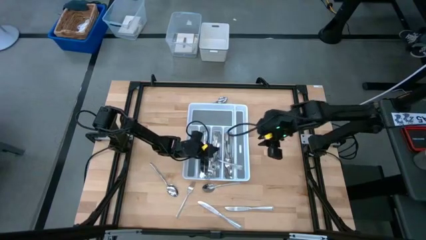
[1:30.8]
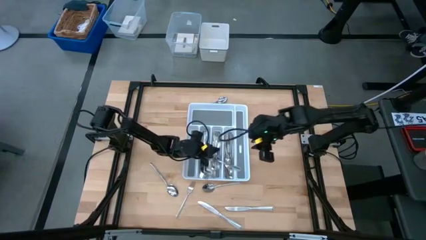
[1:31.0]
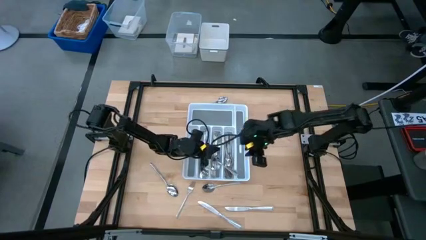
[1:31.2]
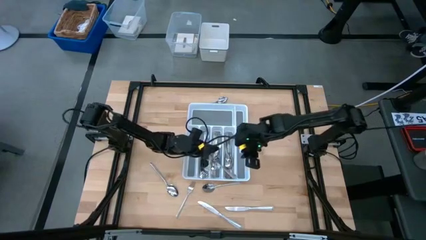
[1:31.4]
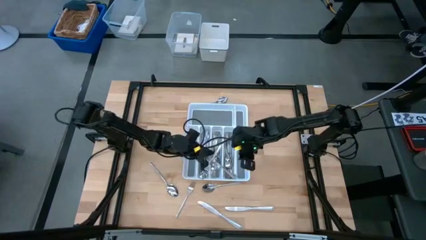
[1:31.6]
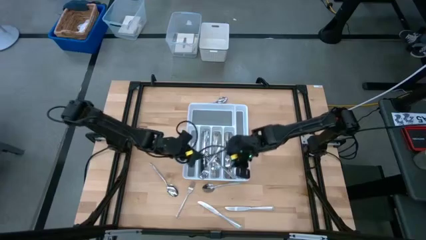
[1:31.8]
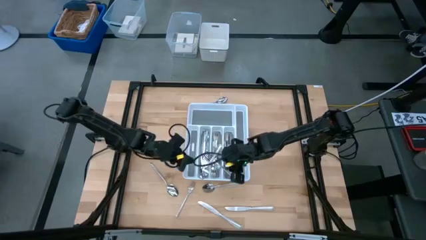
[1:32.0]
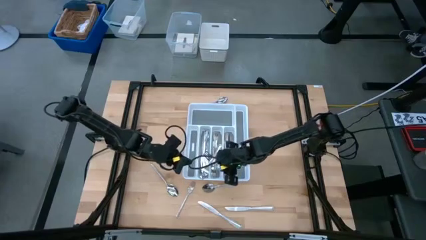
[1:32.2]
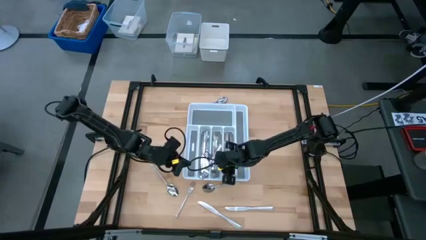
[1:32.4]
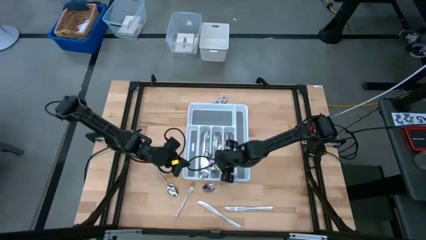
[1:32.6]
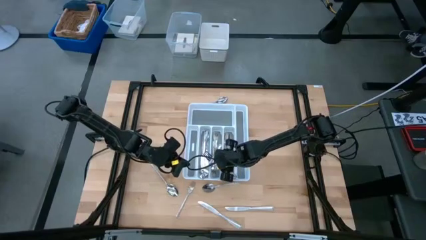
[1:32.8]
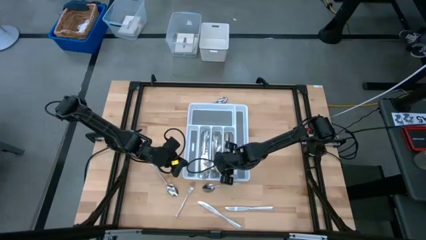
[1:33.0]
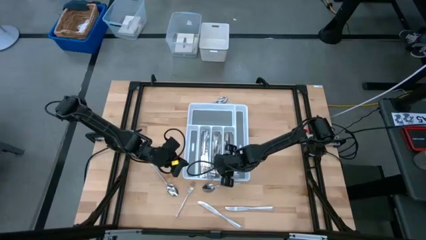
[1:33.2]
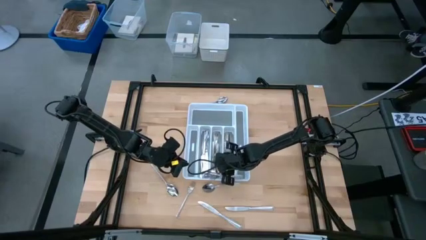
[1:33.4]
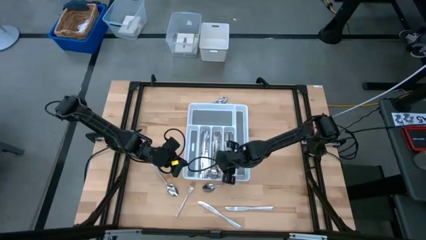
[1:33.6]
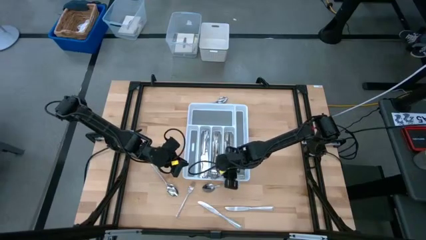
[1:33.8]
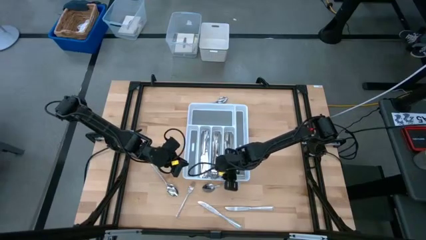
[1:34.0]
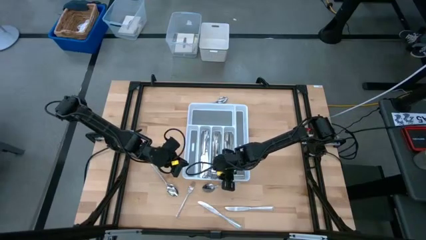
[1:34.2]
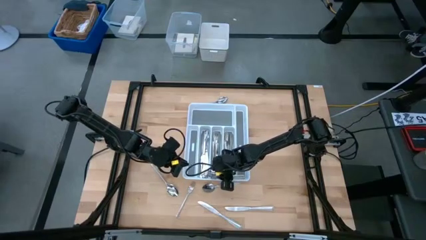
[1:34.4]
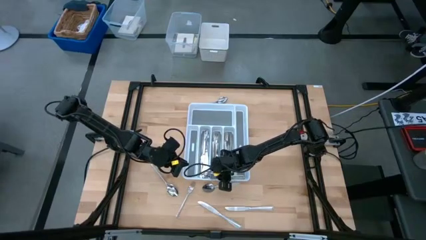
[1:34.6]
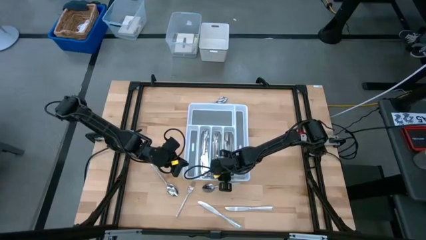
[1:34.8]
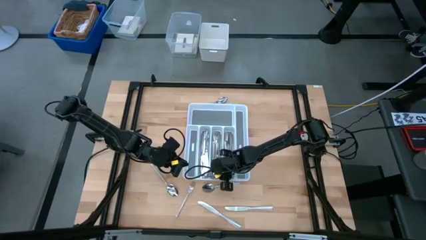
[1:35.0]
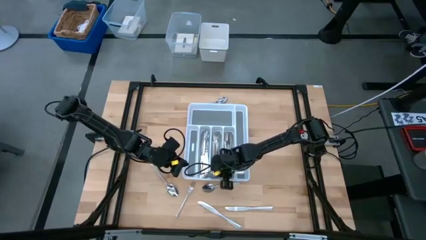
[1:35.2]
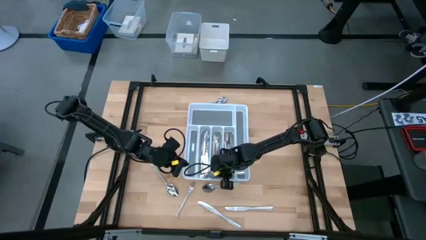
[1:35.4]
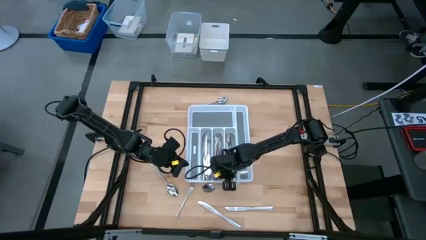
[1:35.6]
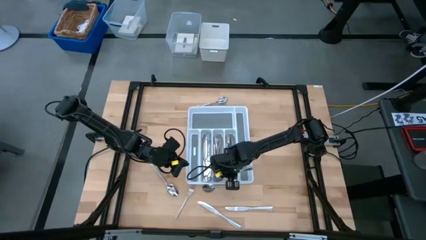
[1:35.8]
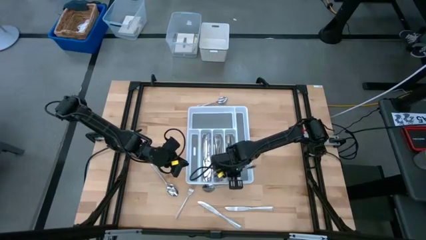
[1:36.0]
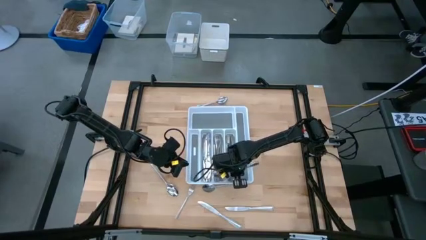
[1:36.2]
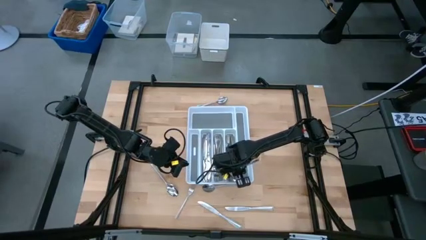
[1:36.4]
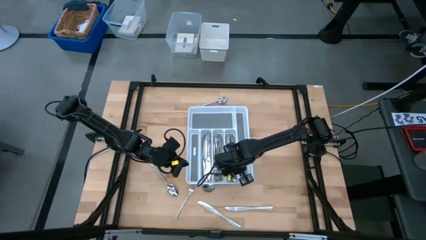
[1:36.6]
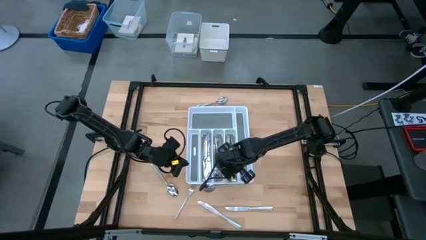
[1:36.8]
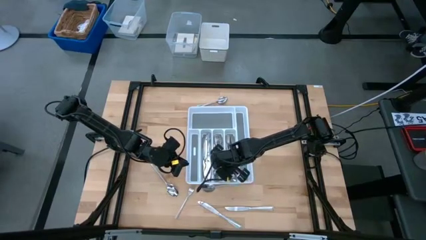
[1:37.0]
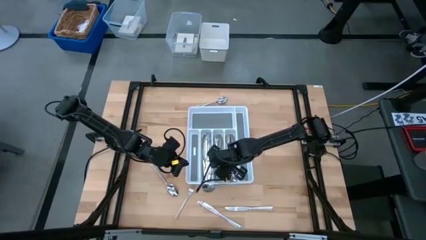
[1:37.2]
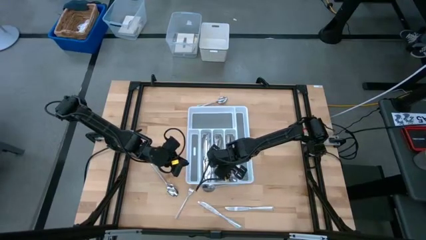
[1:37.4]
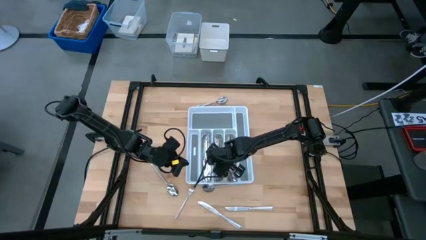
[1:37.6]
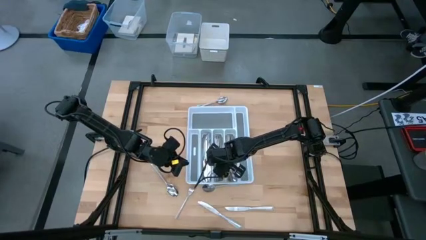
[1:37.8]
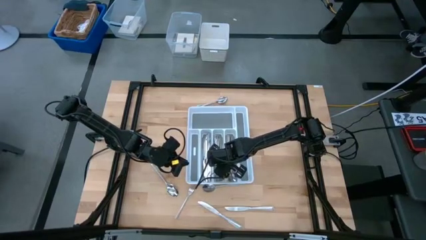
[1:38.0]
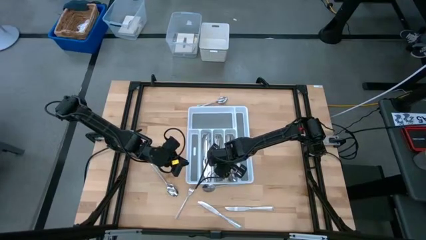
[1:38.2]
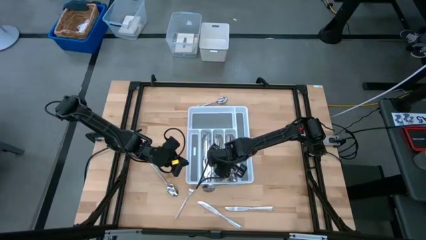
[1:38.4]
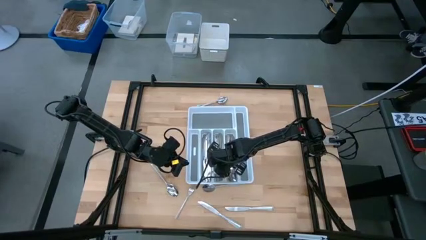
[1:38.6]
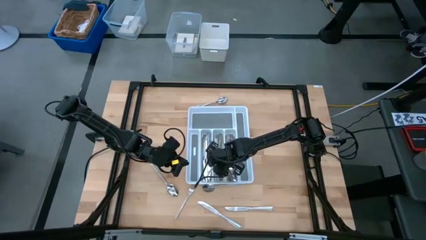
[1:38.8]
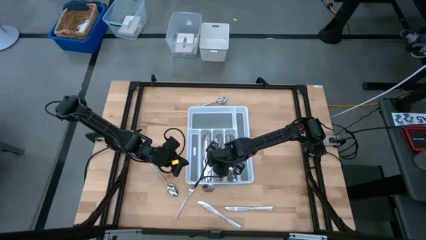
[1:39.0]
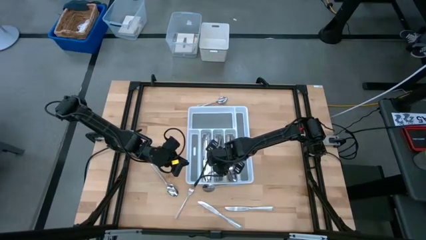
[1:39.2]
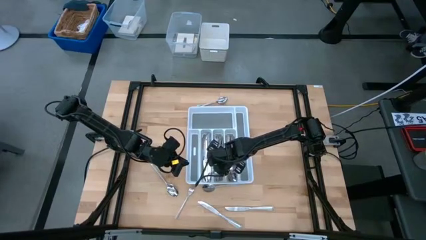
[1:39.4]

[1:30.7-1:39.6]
Task: Sort silverware
Adjust the silver fork in the white cutlery tray

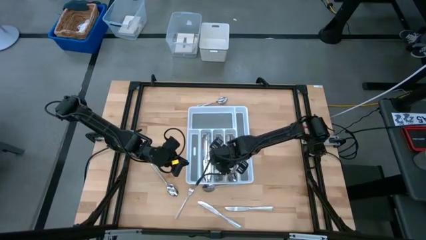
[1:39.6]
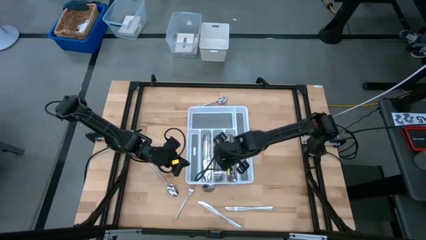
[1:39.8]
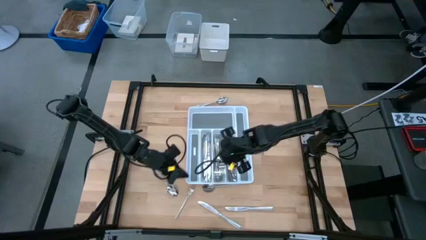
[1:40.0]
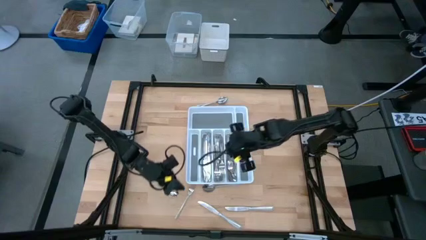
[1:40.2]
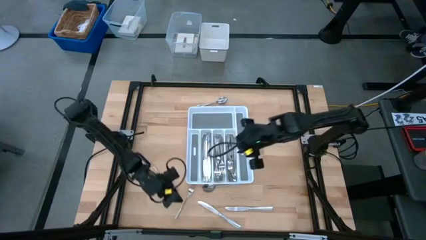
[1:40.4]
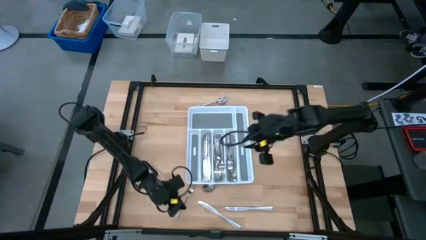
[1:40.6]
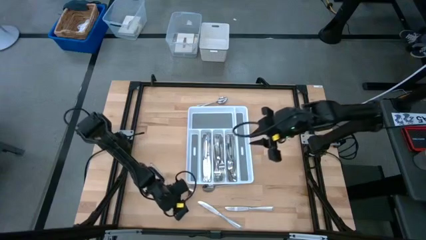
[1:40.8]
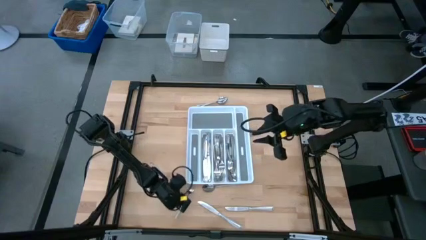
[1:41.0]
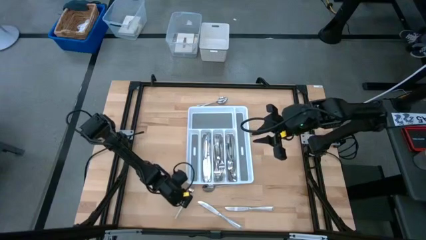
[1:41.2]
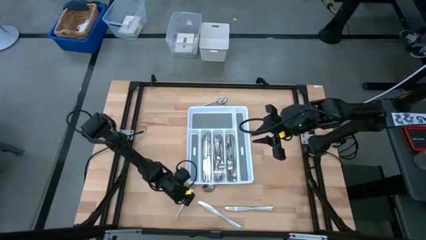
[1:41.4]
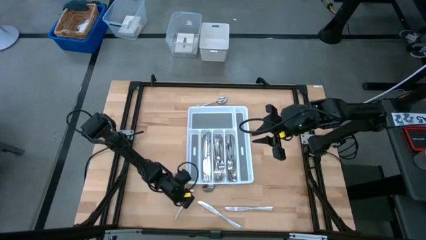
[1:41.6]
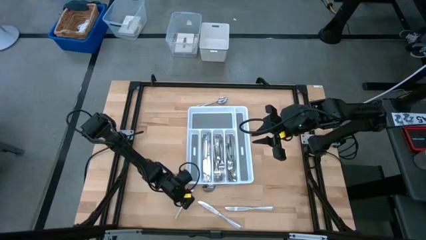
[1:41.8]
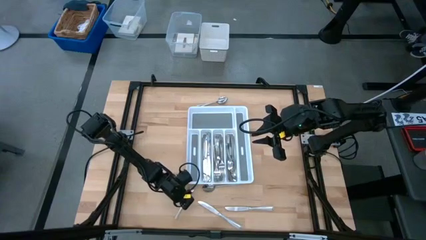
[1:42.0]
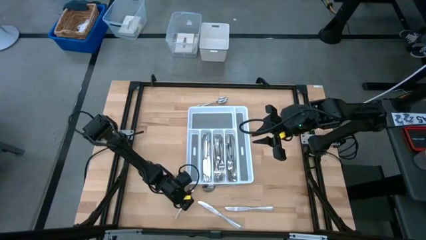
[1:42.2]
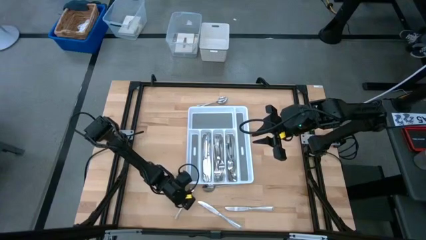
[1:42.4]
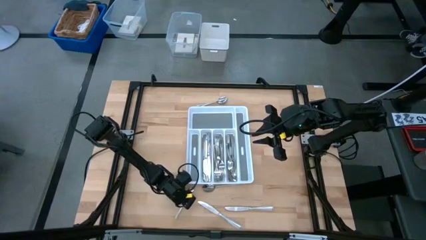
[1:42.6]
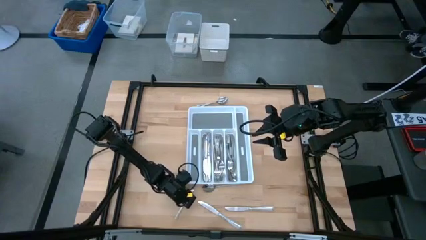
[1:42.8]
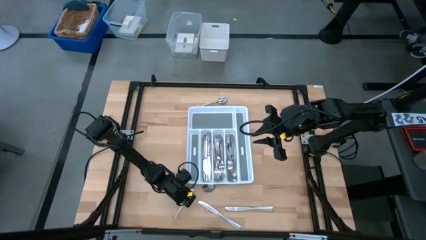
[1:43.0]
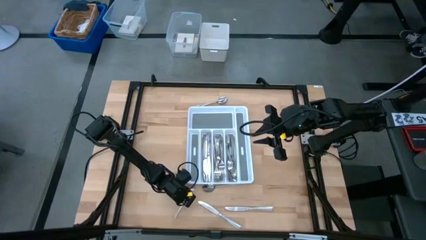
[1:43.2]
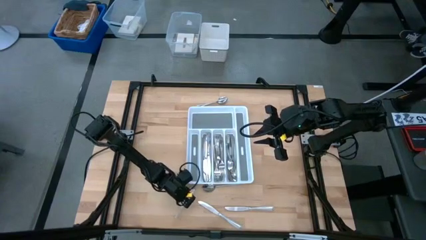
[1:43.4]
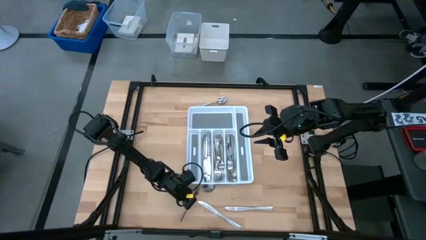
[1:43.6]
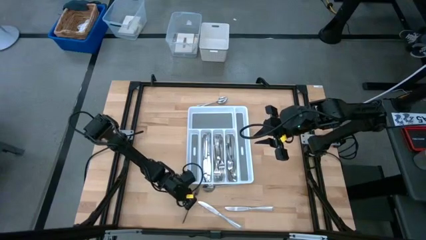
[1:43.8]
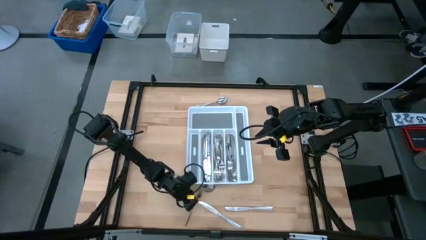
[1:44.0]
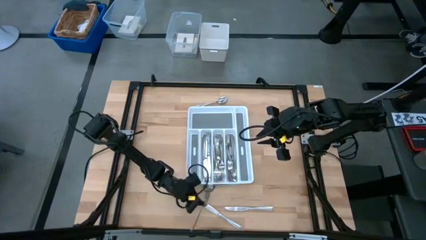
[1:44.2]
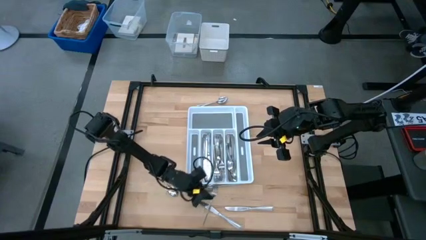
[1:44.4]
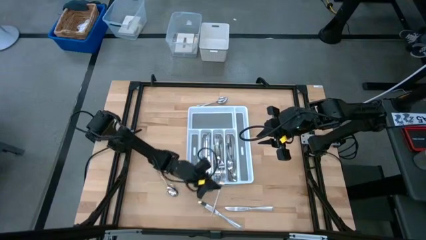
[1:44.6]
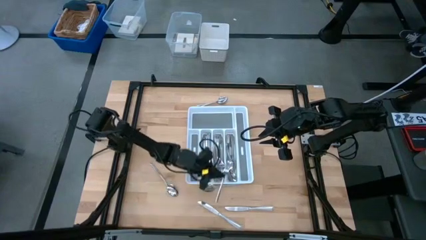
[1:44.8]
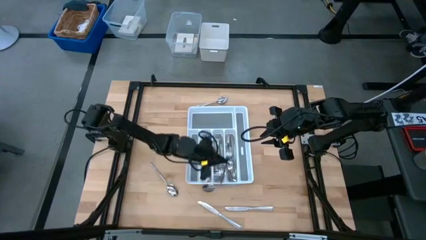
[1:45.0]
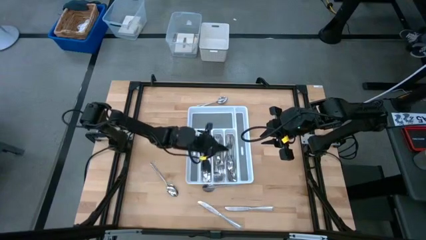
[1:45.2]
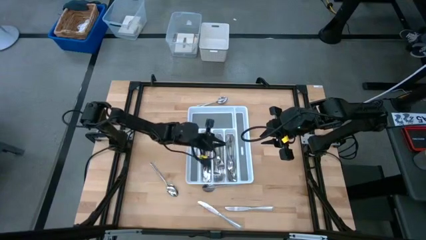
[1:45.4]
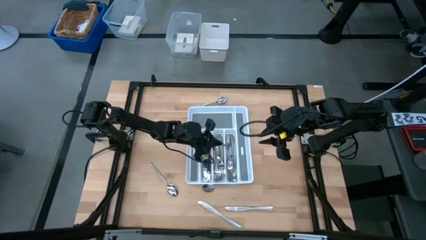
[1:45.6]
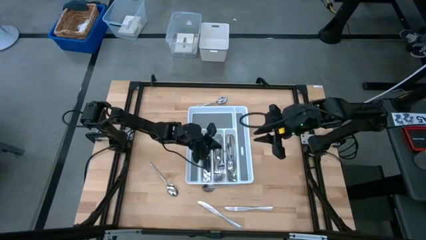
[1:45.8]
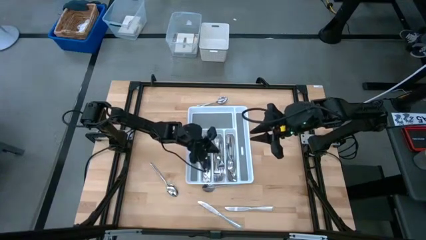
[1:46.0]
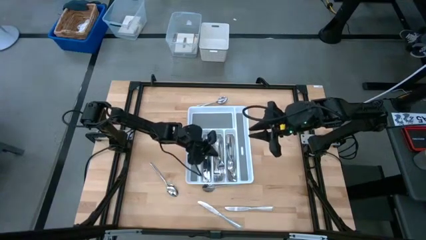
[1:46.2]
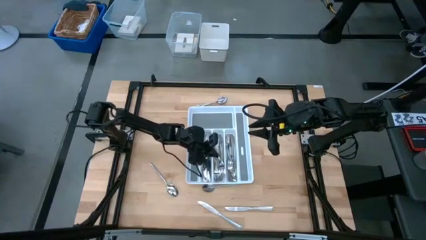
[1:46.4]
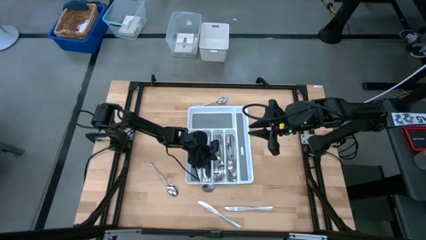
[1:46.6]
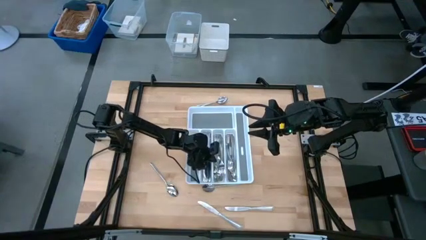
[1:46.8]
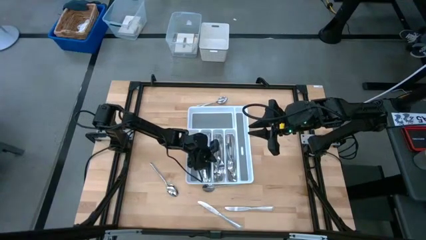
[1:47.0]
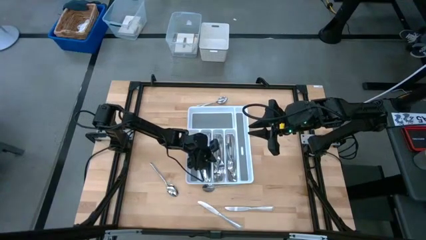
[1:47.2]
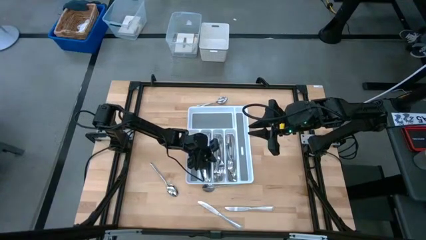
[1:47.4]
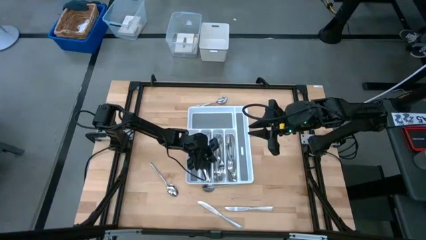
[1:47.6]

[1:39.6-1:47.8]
Put the silver fork into the white cutlery tray
